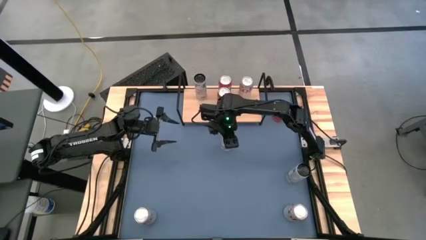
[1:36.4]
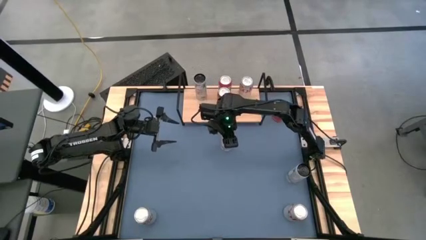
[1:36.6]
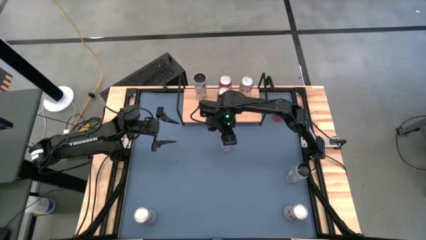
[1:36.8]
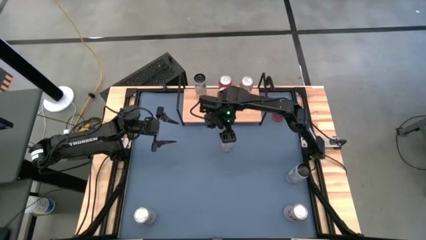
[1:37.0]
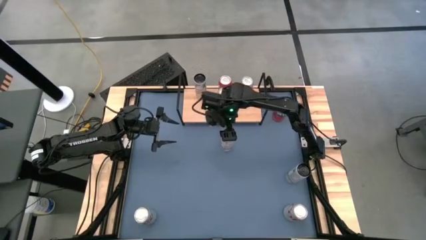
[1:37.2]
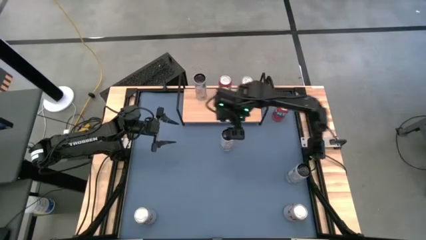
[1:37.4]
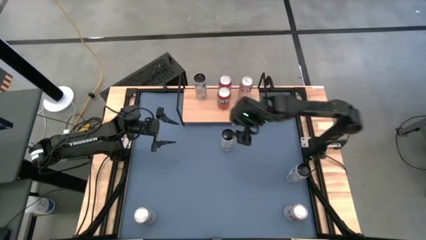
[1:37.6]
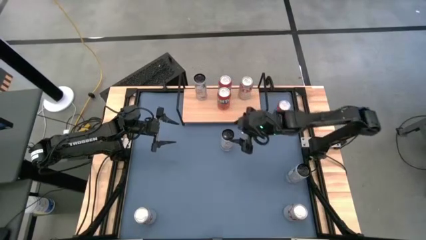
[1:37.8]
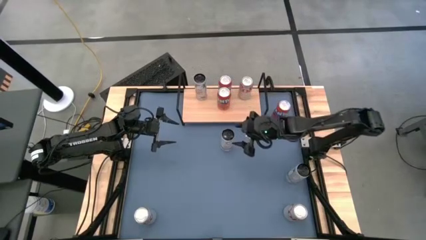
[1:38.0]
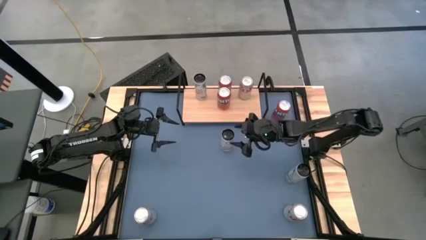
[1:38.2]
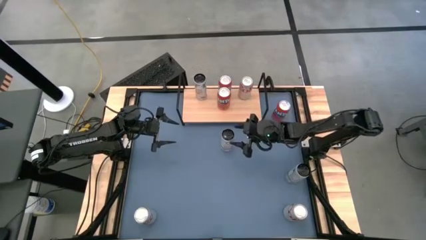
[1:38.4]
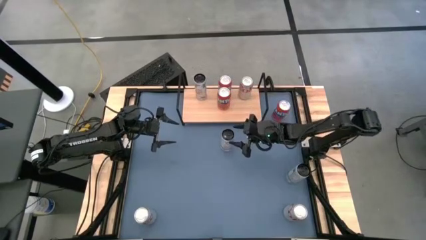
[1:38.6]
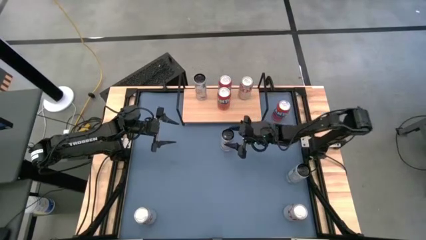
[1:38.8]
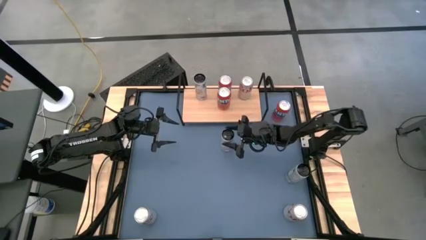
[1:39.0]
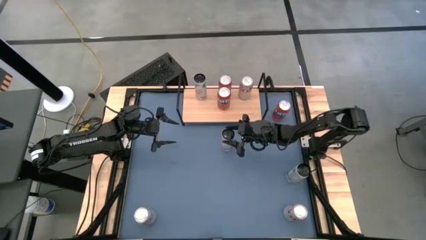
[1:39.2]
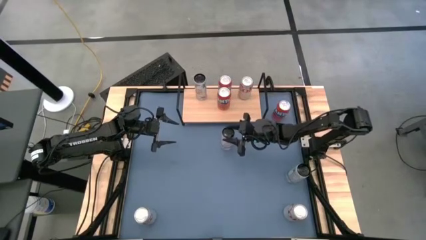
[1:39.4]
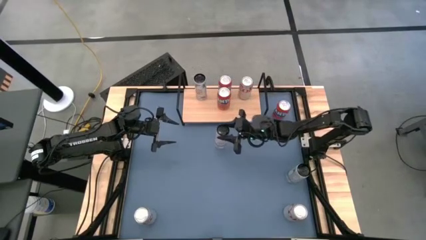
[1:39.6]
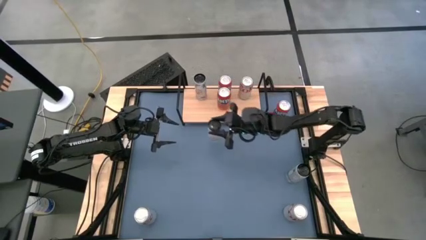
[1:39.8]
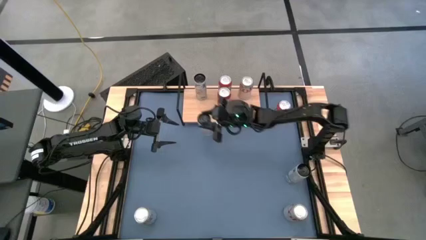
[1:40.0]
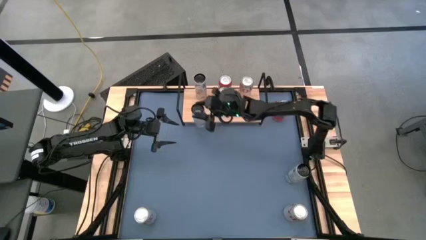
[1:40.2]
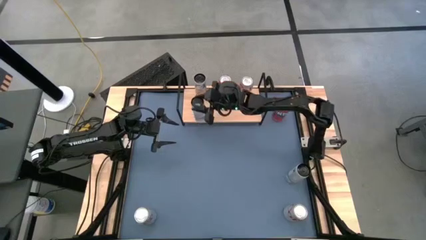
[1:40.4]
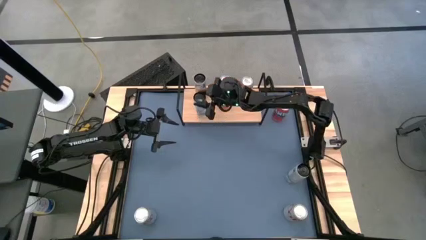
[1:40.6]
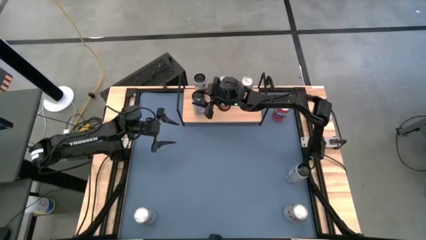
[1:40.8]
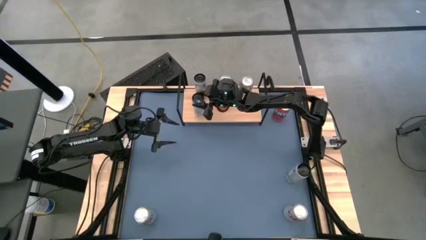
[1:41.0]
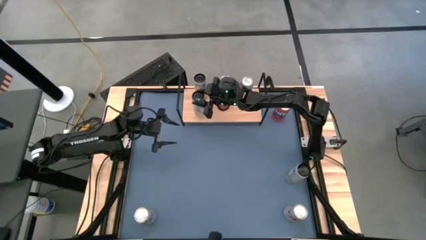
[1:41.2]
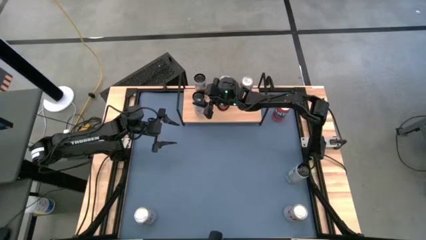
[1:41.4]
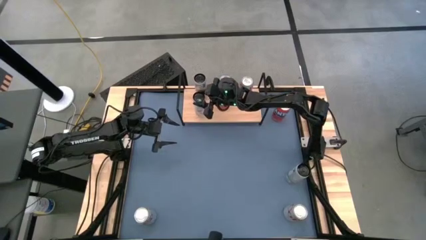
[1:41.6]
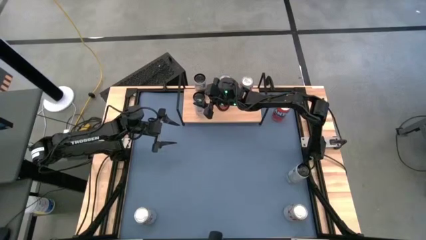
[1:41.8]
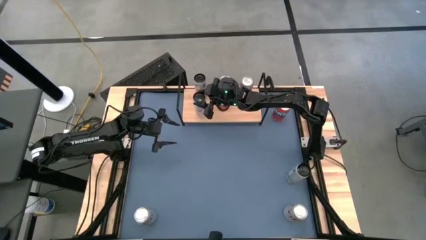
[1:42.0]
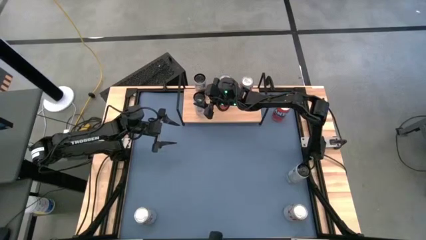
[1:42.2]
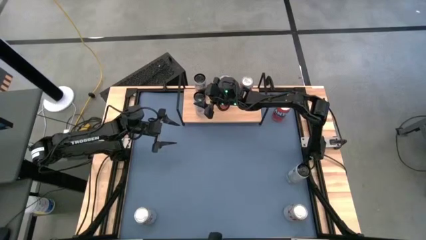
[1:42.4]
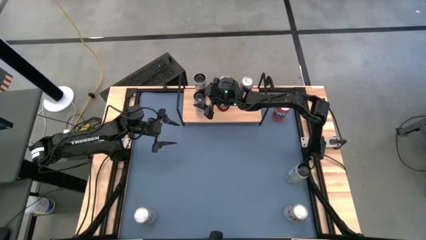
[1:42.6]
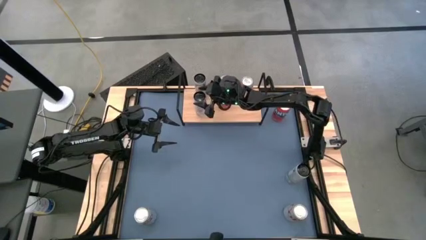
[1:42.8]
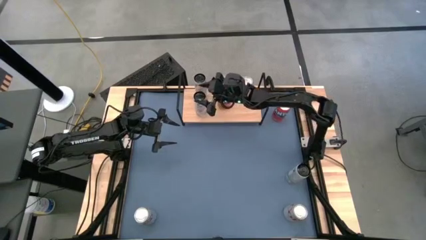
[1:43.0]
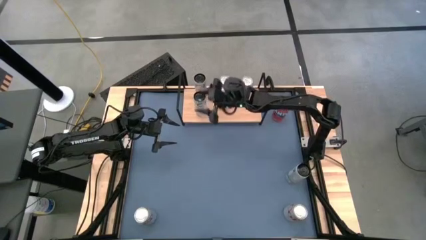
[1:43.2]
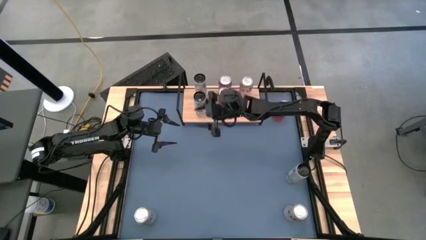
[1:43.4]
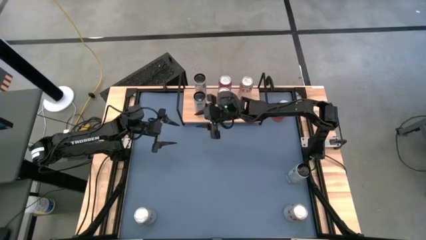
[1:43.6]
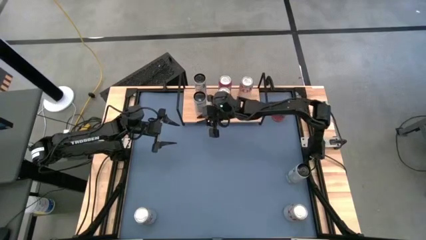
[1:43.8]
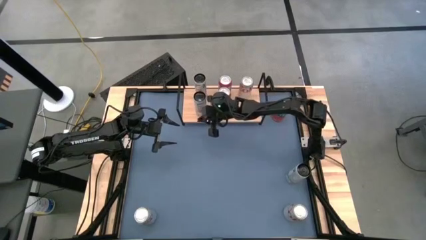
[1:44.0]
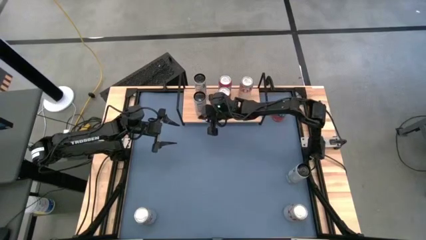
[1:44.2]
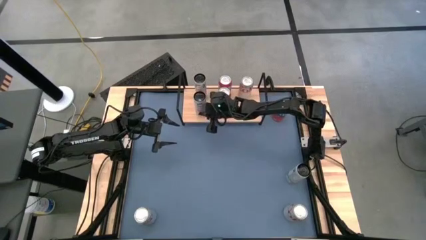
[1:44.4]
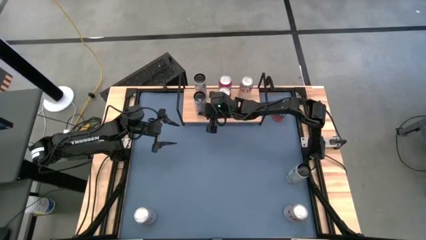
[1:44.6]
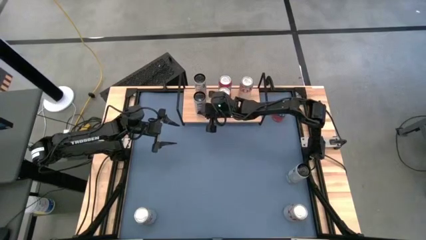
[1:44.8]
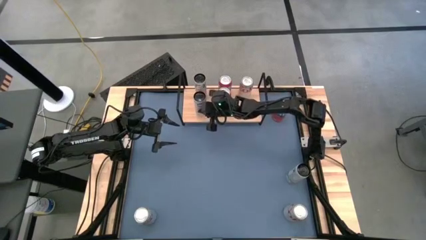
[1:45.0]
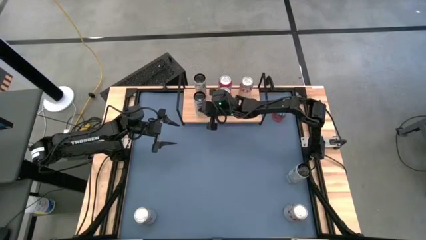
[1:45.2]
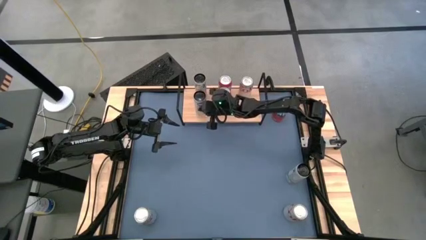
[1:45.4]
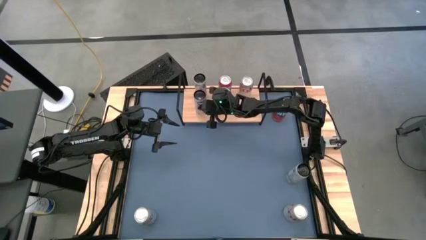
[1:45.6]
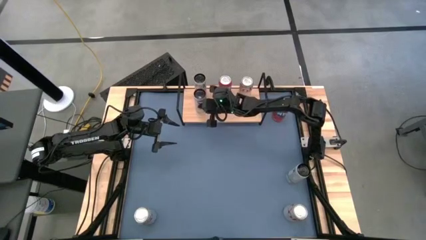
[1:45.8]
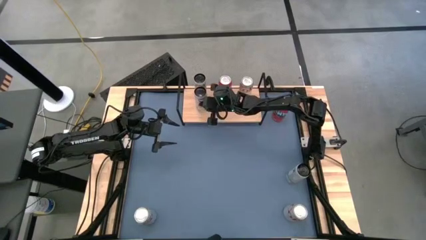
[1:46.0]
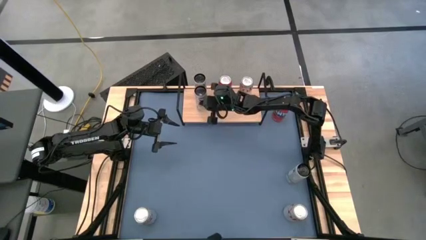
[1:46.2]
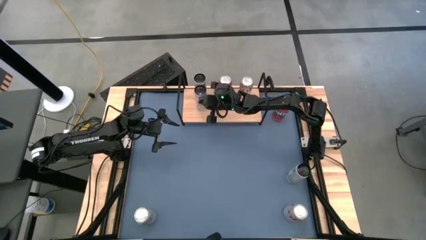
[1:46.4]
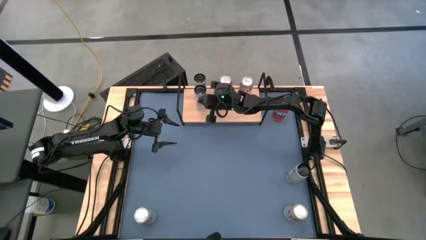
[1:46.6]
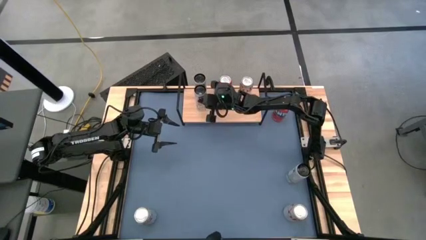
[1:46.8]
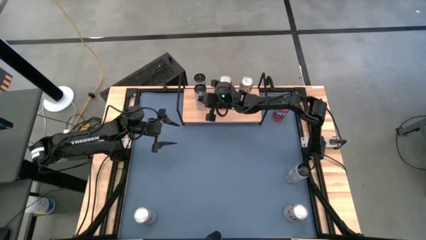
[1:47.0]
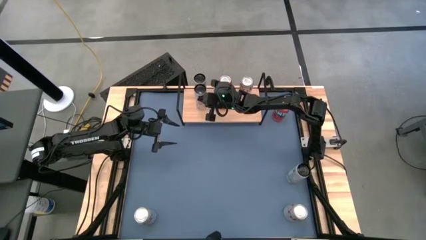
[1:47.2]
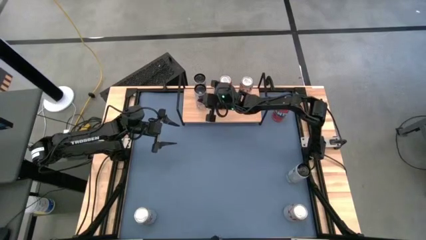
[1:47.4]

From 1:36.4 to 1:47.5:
Task: Place canned beverage on shelf
Put the bottom black soda can on the shelf aligned with the other black soda can

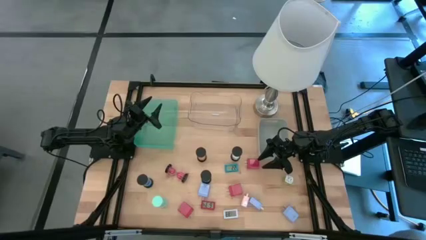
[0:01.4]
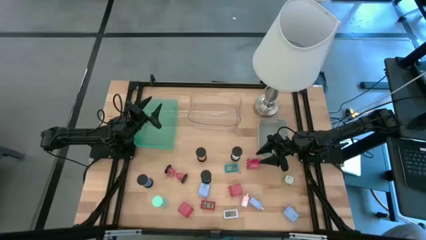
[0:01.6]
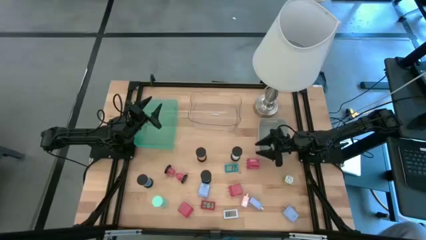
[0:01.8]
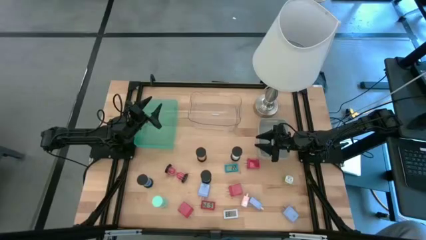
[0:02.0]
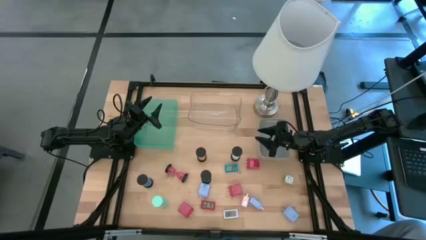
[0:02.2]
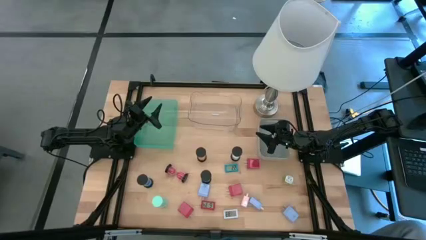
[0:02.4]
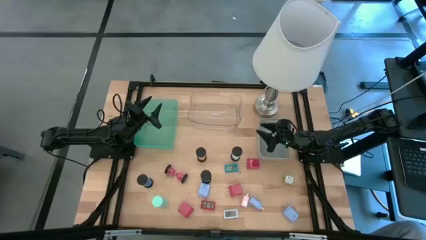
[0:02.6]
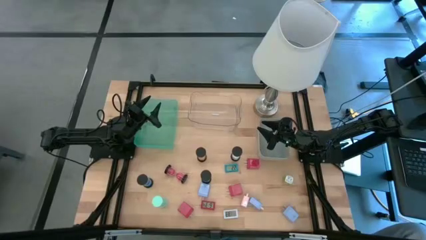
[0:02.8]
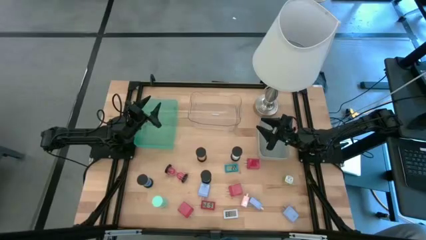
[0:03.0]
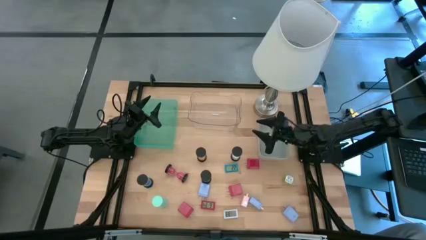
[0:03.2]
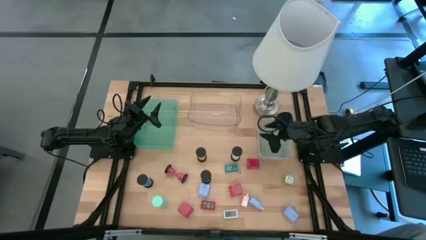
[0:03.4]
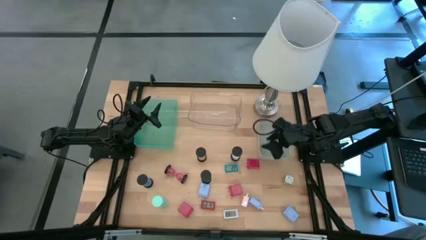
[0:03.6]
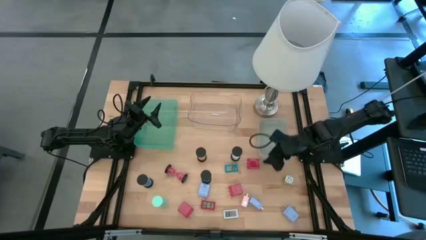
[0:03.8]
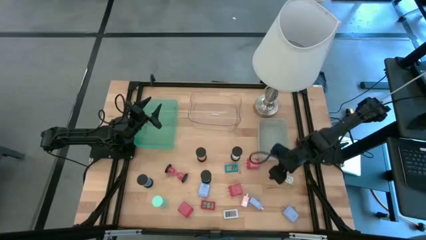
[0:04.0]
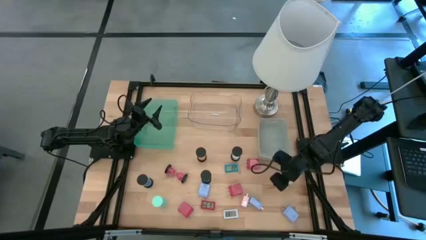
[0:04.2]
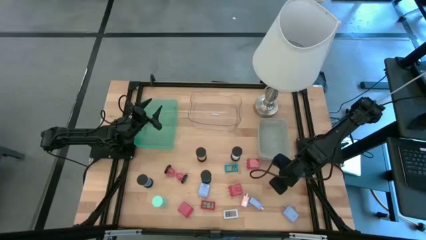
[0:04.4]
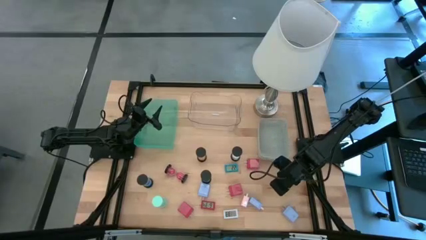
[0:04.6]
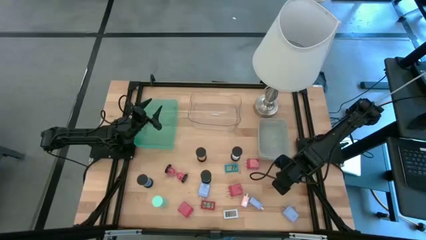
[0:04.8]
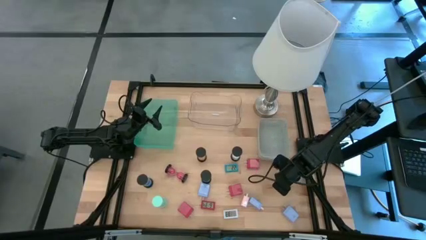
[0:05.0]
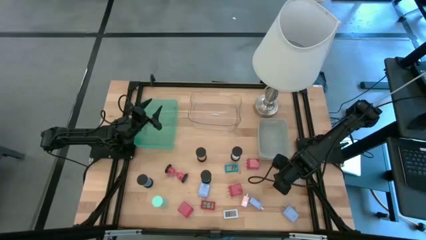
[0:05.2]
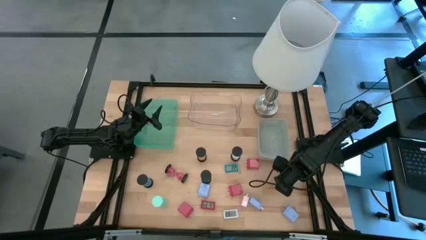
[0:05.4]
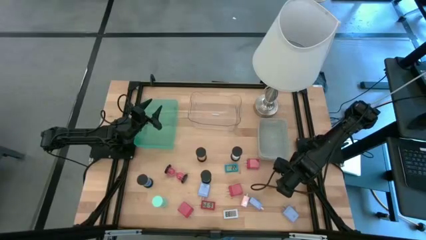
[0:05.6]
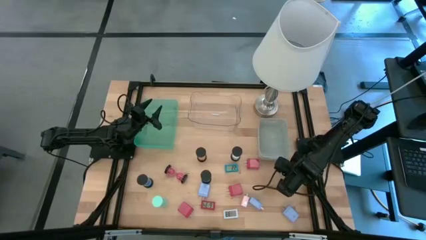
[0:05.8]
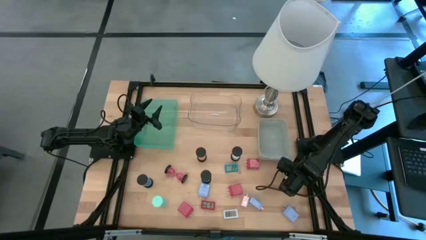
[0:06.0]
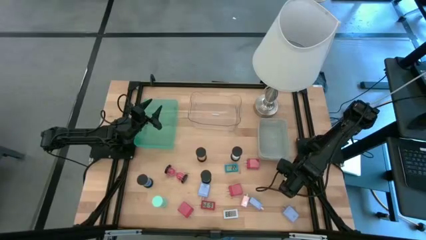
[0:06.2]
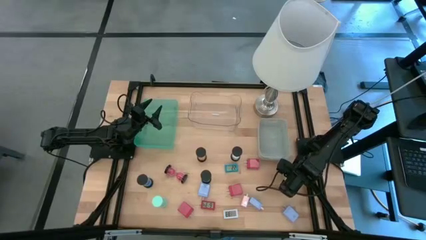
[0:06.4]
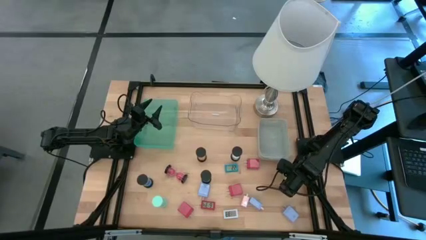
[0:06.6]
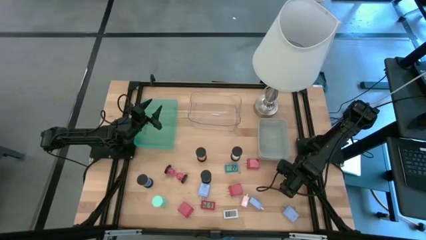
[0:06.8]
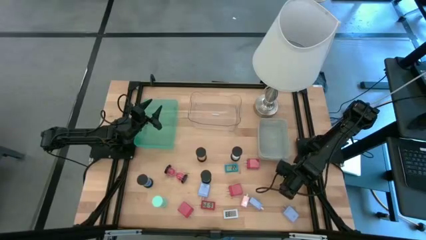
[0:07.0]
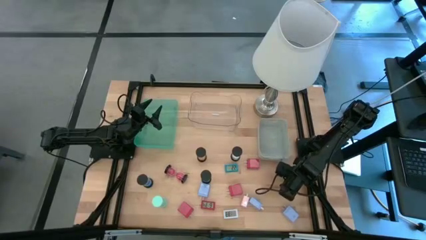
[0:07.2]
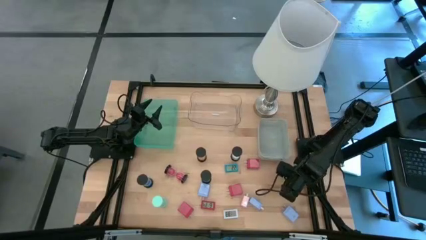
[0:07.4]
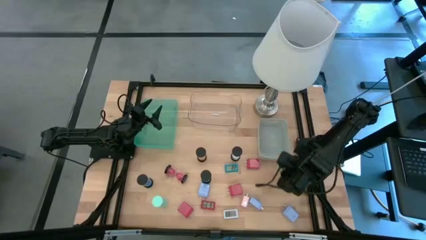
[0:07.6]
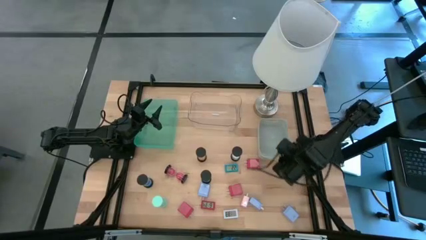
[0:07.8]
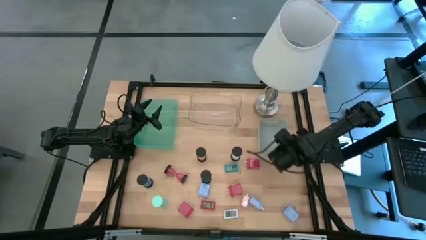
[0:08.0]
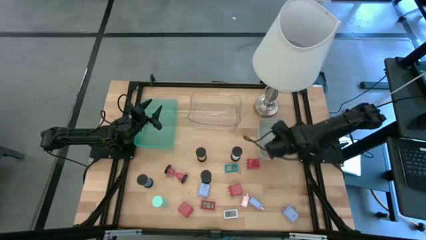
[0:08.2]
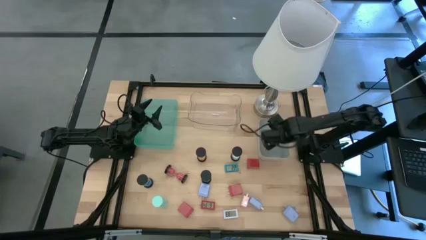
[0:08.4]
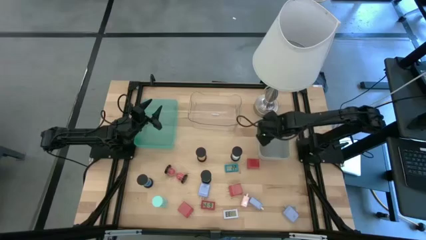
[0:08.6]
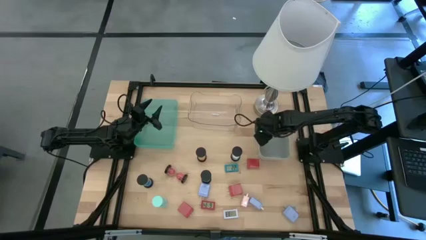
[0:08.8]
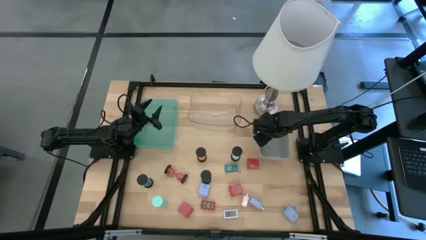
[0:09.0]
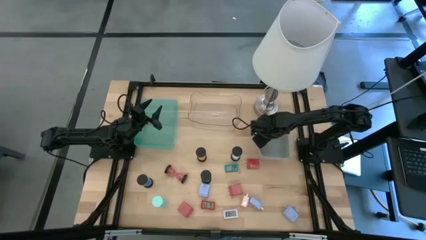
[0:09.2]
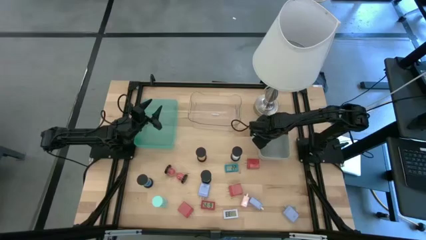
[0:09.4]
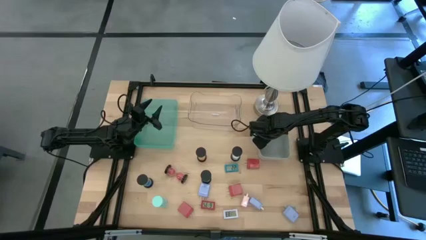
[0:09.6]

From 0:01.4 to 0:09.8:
Task: Pick & Place Office items
Put the green charger adapter into the gray bin
